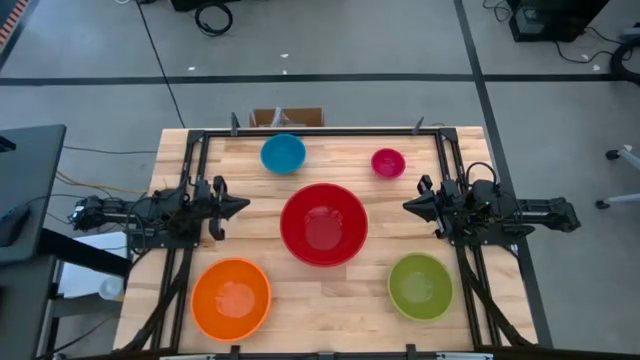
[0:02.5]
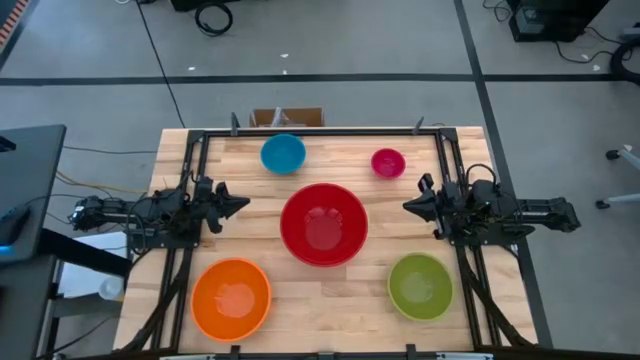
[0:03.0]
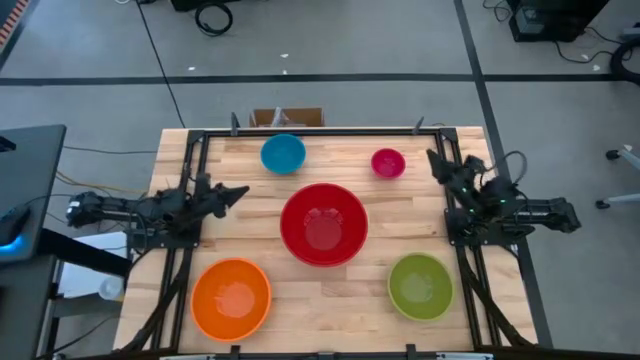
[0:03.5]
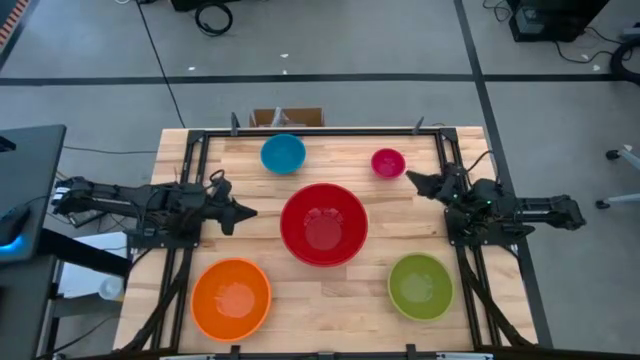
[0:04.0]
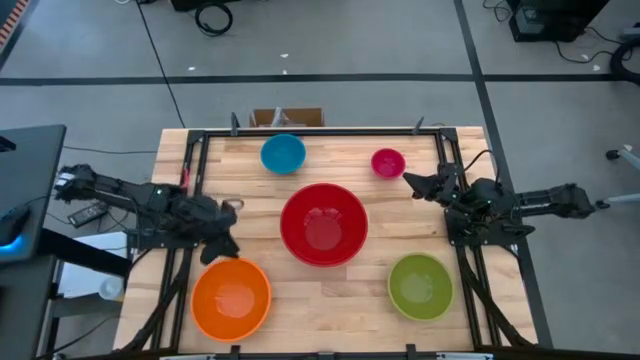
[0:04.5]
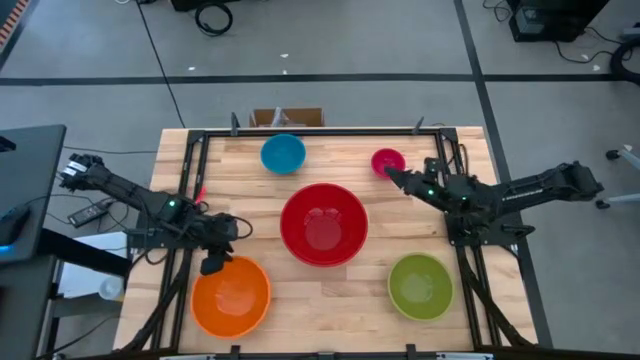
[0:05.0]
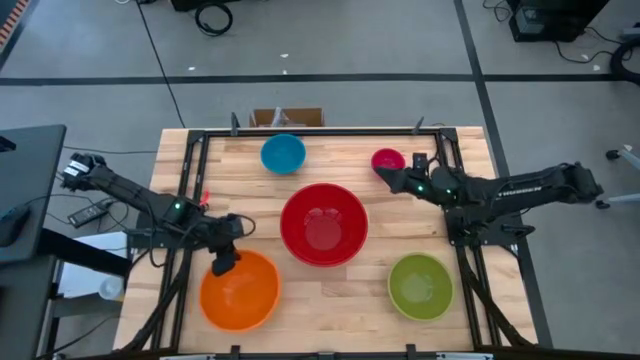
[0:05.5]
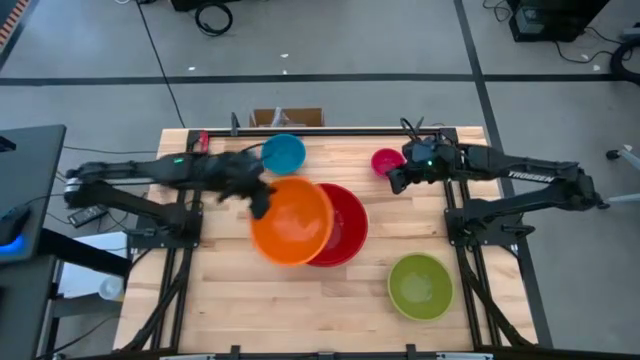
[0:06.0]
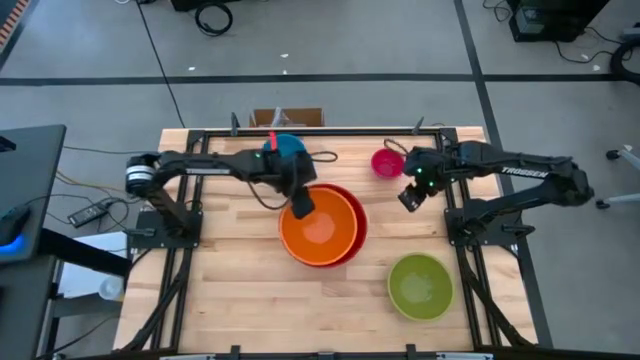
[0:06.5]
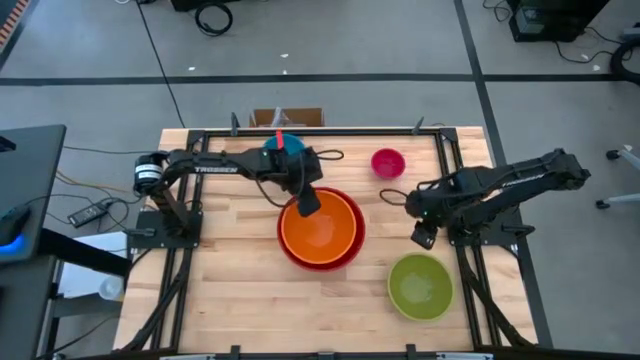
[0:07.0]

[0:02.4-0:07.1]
Stack the orange bowl on top of the red bowl

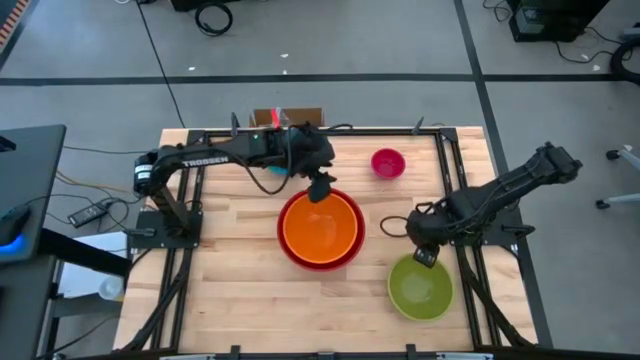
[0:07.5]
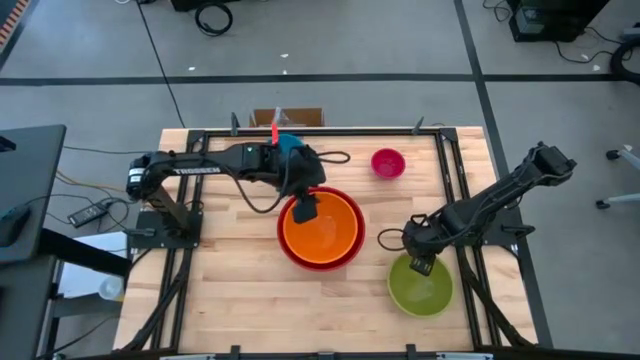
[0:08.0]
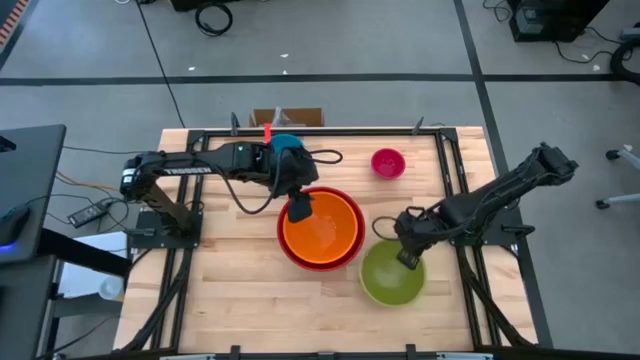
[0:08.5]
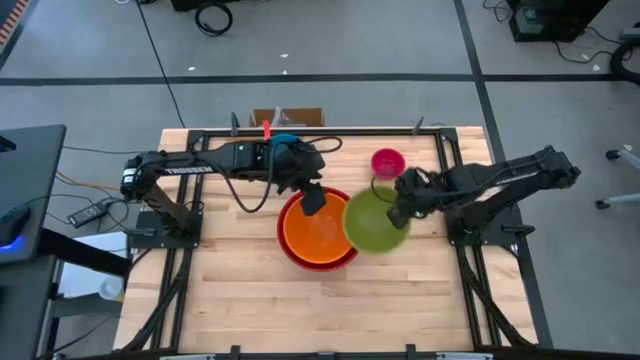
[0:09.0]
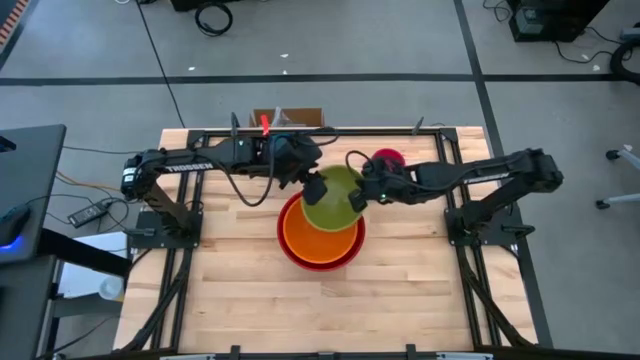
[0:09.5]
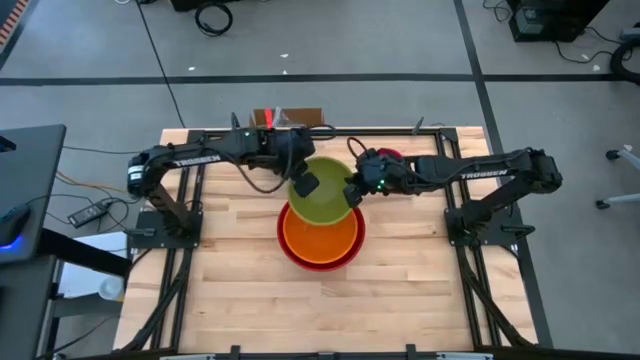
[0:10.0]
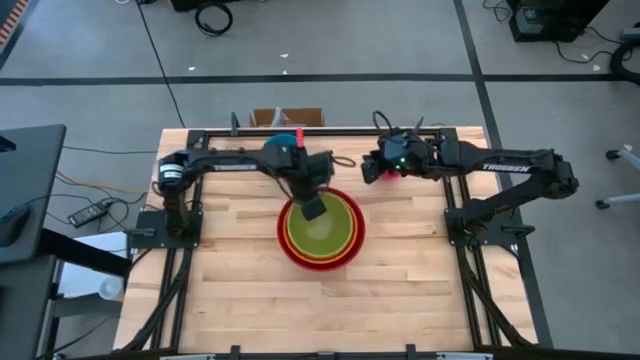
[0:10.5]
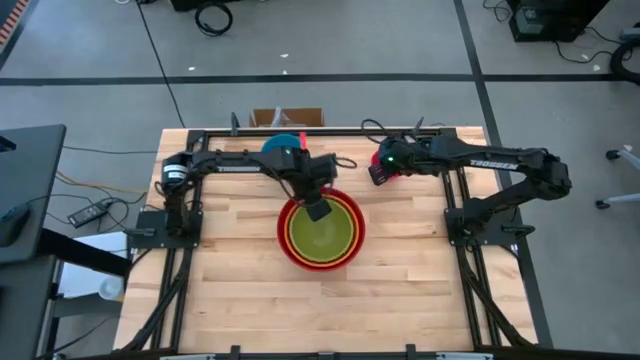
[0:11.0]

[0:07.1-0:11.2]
Stack the green bowl on top of the orange bowl

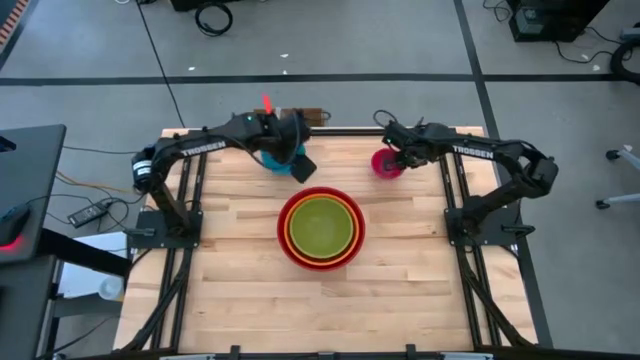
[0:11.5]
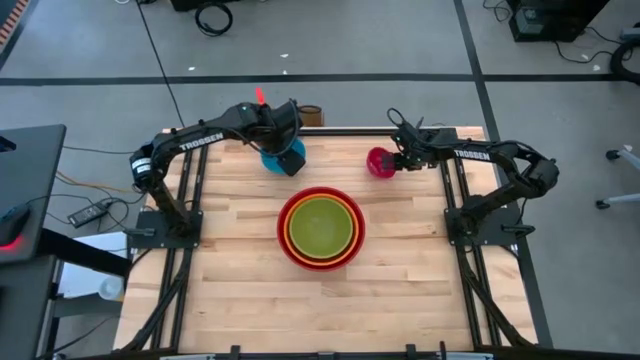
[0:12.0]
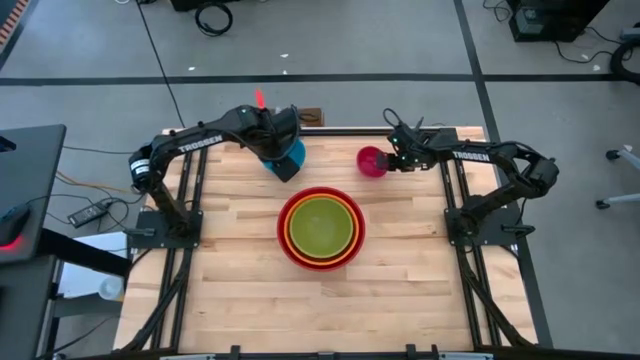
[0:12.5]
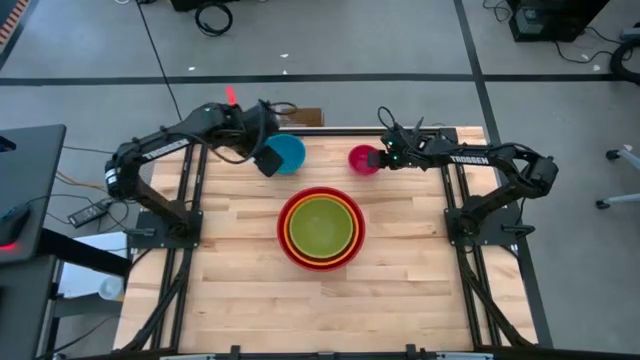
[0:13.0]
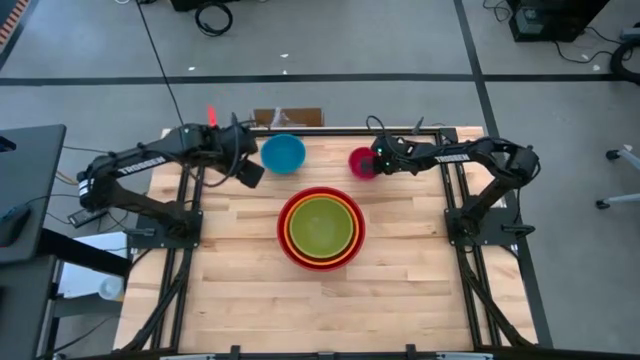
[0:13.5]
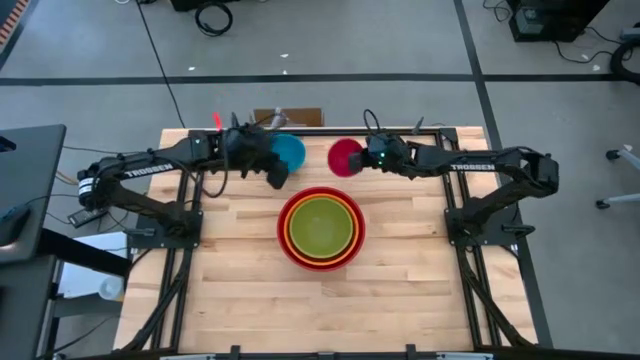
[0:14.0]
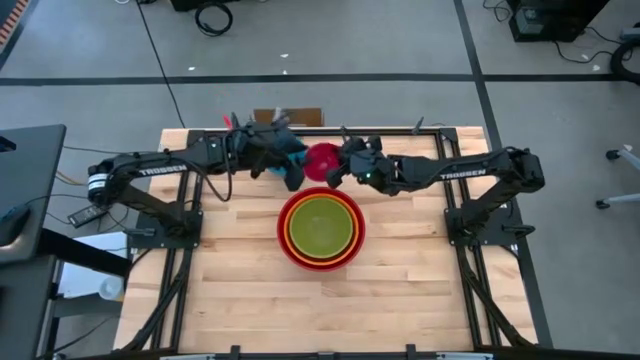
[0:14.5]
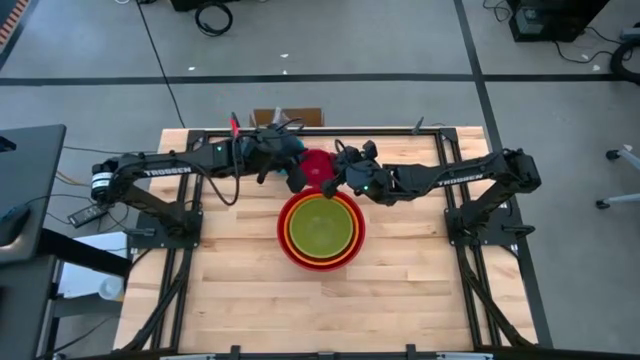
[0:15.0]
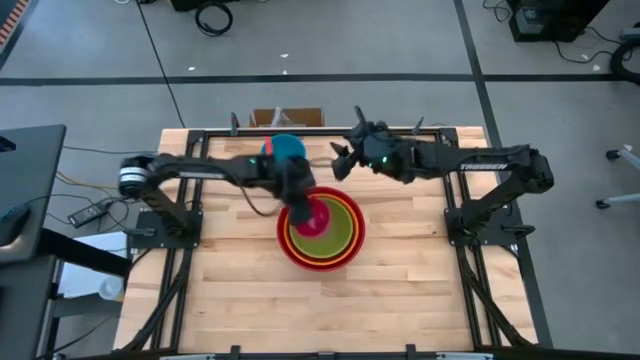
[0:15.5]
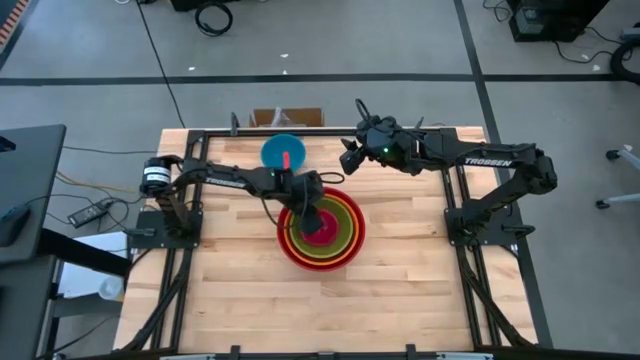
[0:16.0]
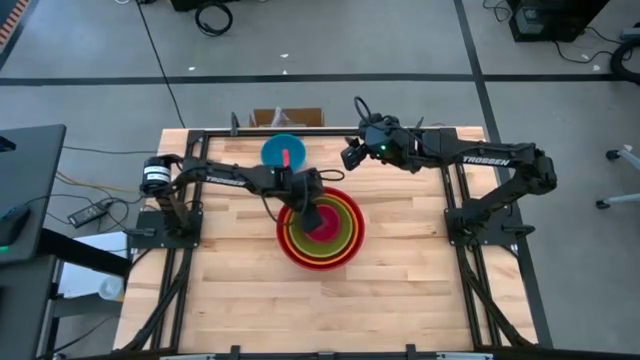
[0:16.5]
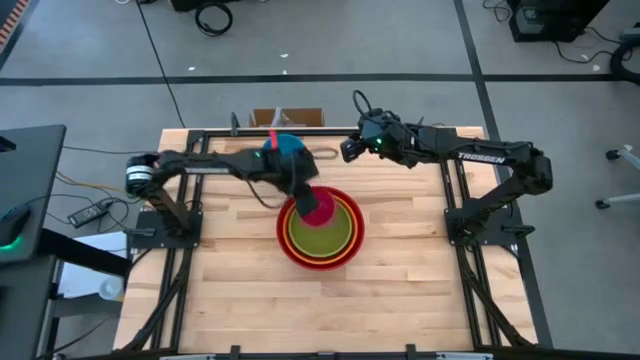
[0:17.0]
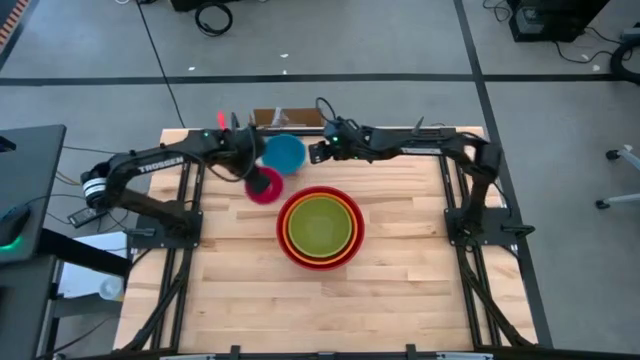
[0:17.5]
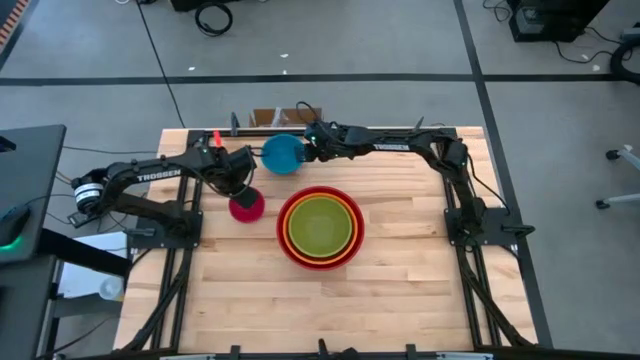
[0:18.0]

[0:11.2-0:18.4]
Stack the pink bowl on top of the green bowl

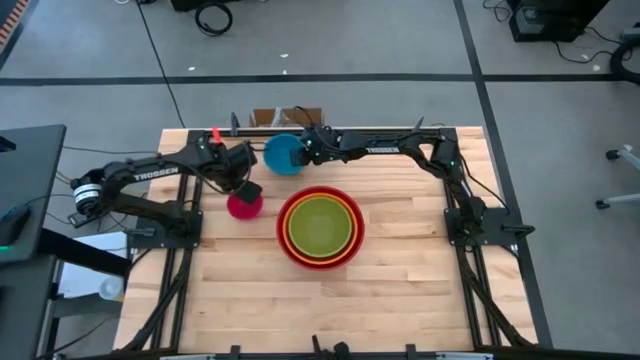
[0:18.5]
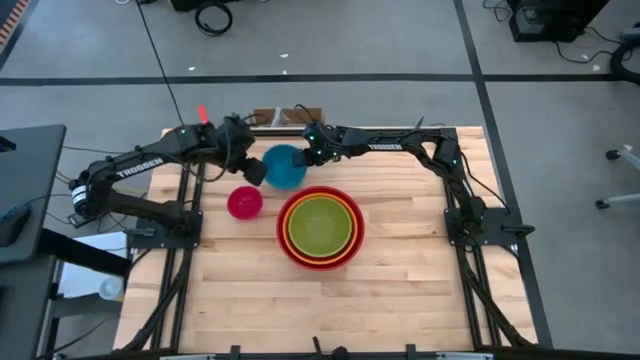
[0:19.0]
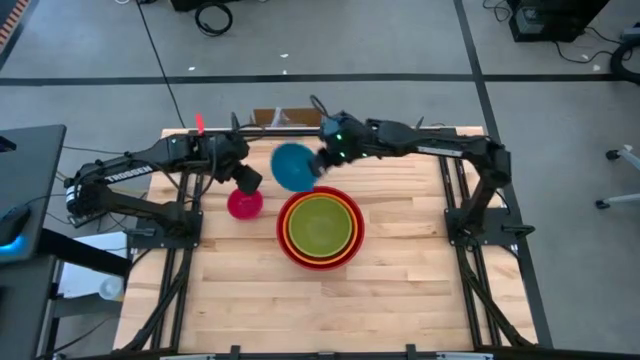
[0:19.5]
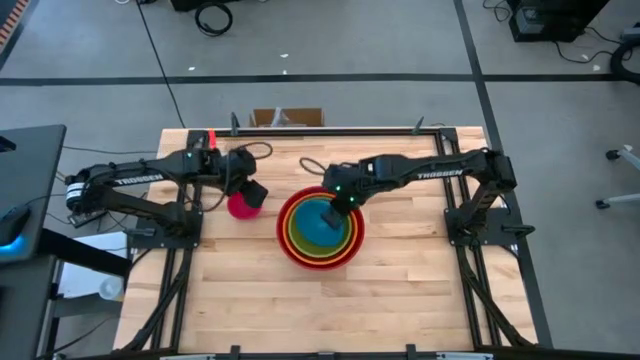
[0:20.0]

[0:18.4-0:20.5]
Stack the blue bowl on top of the green bowl

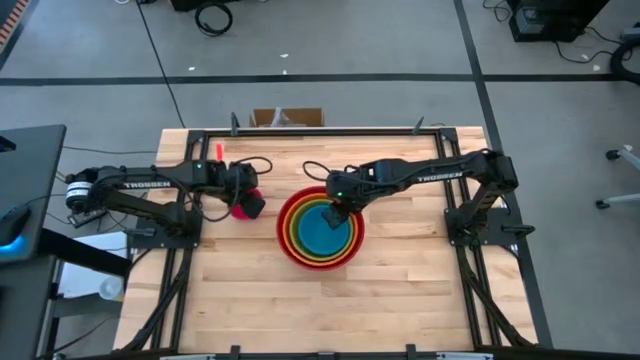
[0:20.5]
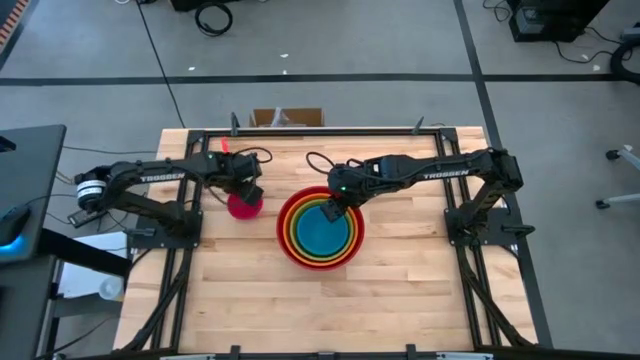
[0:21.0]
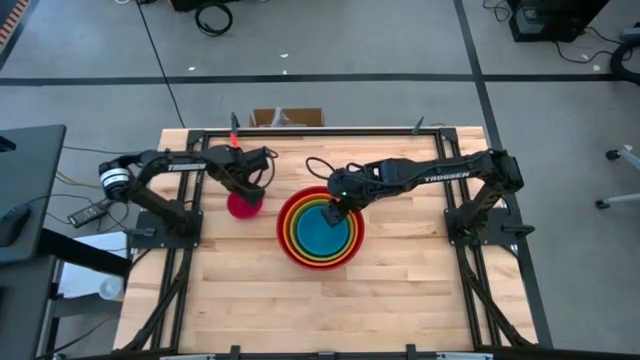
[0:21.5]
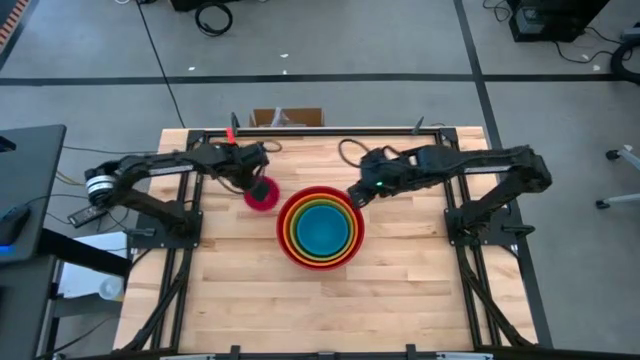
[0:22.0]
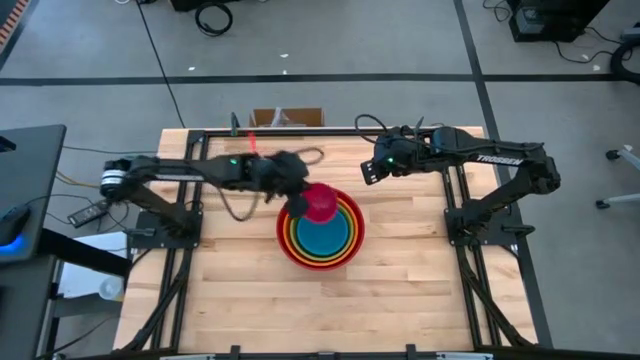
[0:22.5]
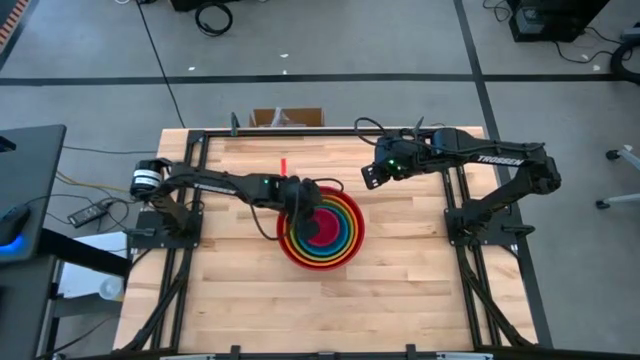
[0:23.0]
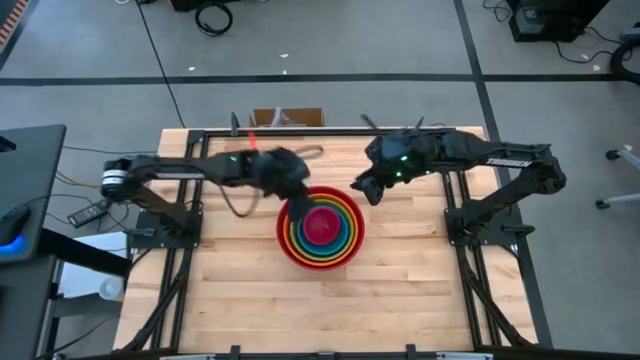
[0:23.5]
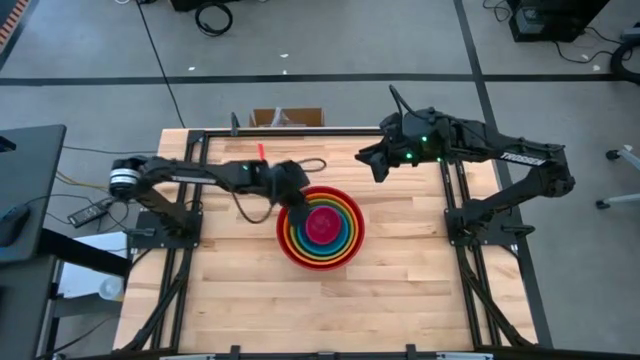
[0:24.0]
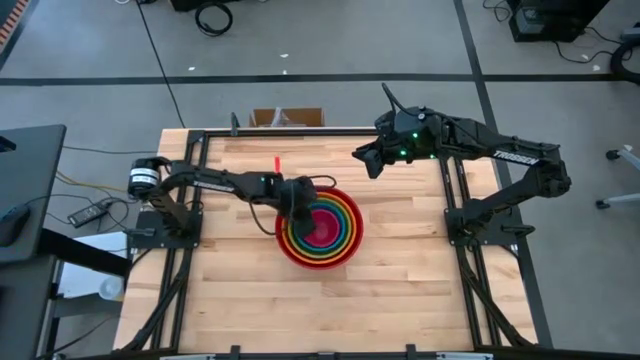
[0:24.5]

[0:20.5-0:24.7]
Stack the pink bowl on top of the blue bowl
